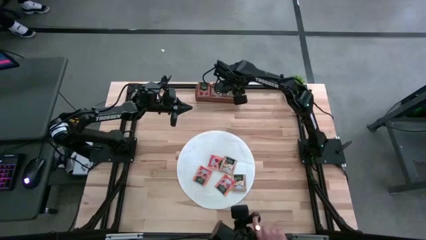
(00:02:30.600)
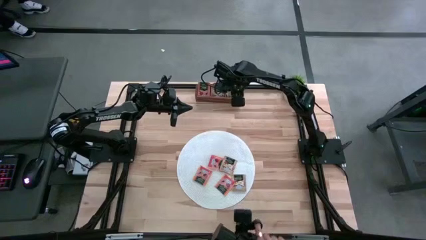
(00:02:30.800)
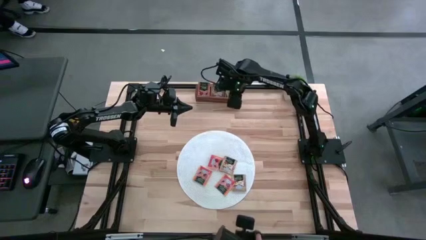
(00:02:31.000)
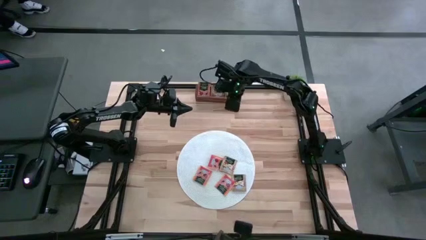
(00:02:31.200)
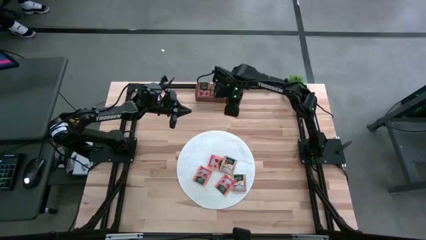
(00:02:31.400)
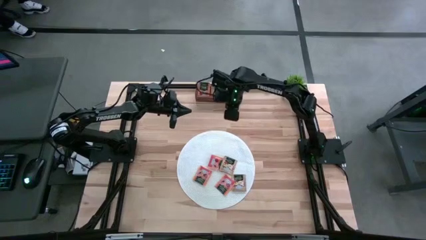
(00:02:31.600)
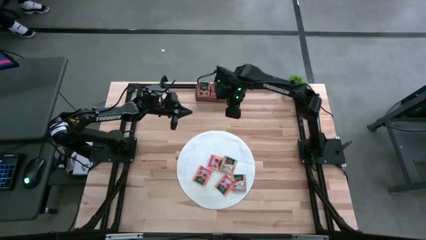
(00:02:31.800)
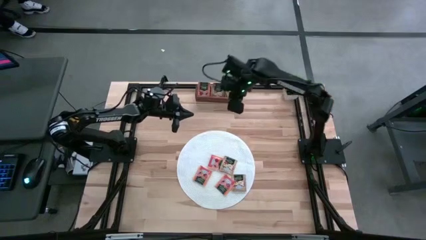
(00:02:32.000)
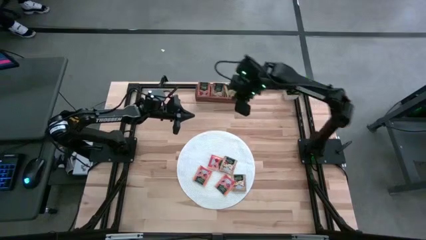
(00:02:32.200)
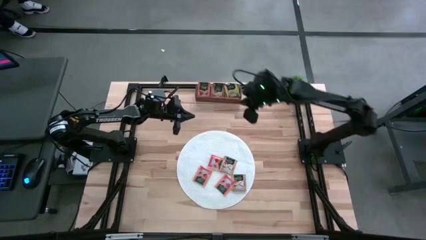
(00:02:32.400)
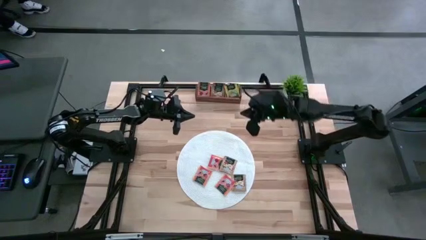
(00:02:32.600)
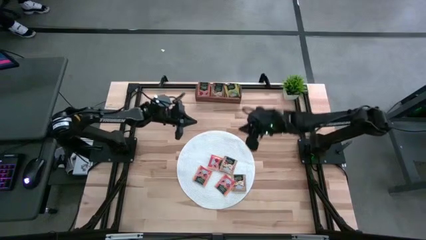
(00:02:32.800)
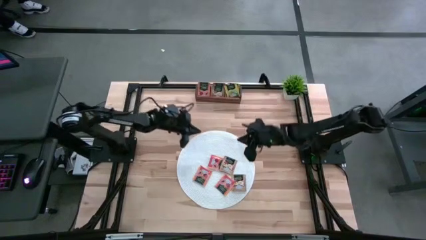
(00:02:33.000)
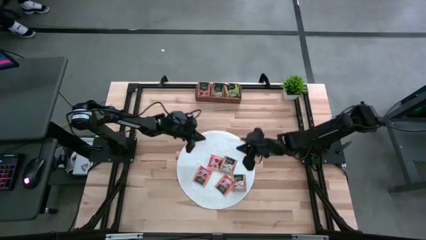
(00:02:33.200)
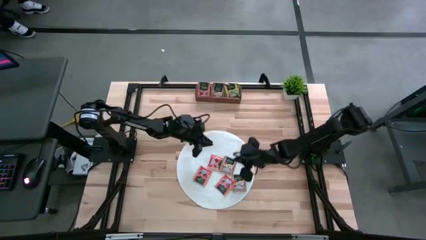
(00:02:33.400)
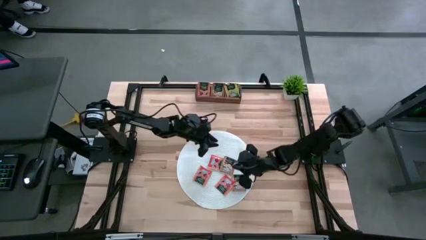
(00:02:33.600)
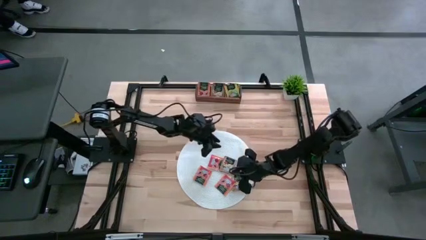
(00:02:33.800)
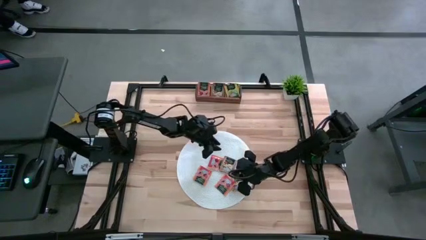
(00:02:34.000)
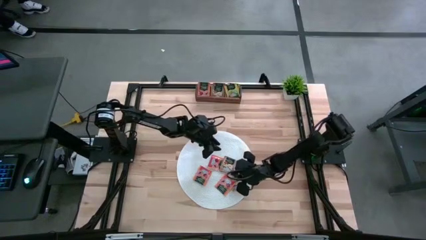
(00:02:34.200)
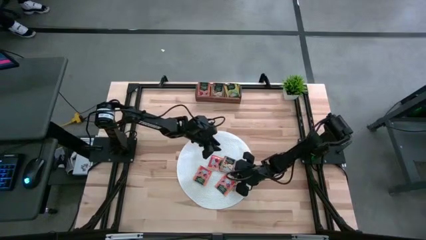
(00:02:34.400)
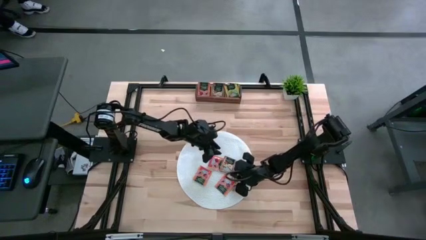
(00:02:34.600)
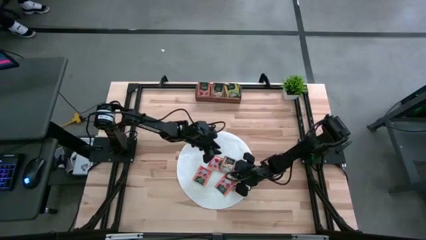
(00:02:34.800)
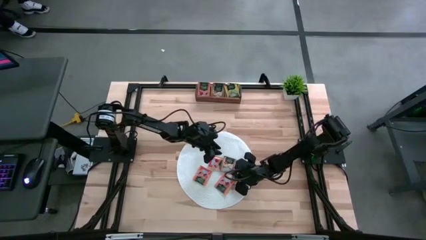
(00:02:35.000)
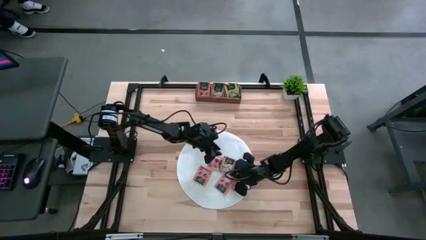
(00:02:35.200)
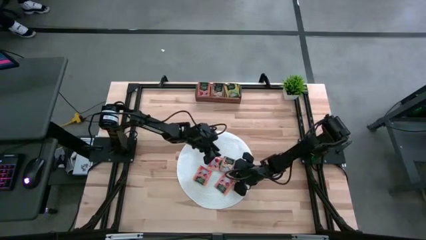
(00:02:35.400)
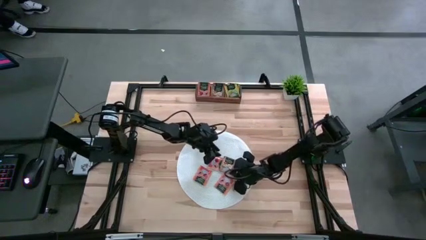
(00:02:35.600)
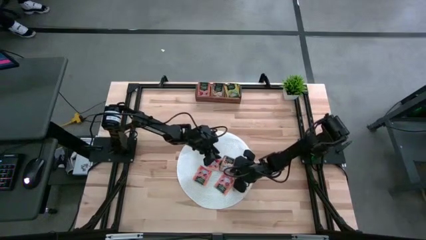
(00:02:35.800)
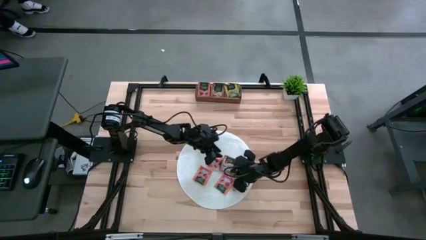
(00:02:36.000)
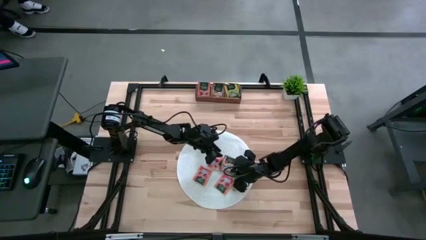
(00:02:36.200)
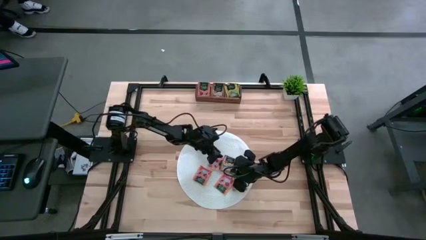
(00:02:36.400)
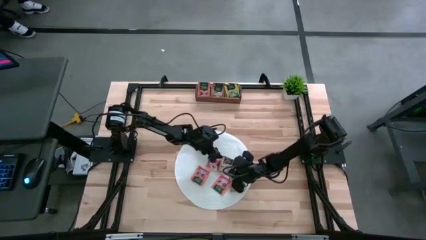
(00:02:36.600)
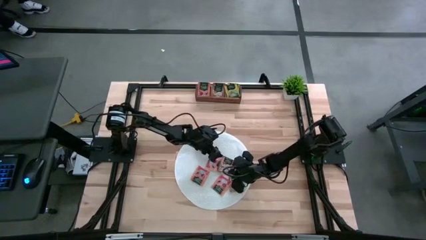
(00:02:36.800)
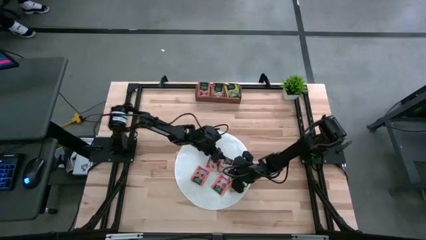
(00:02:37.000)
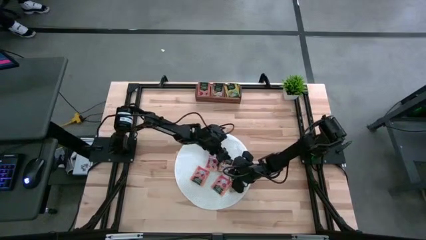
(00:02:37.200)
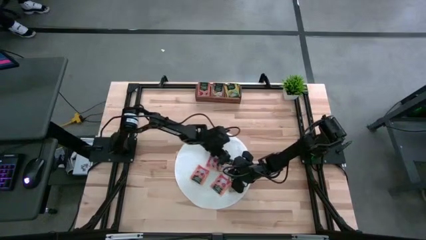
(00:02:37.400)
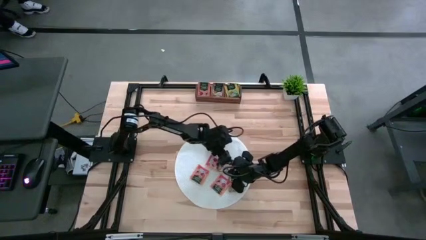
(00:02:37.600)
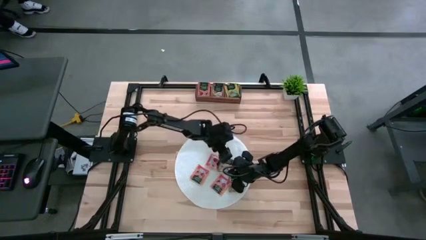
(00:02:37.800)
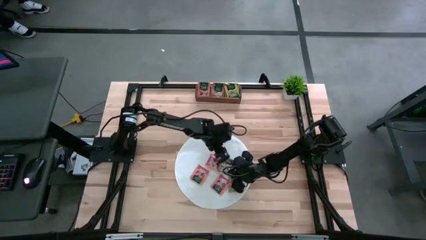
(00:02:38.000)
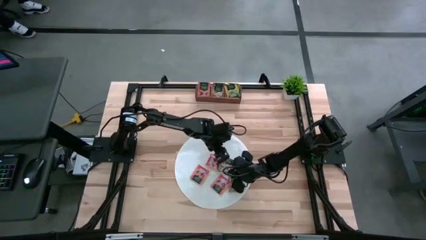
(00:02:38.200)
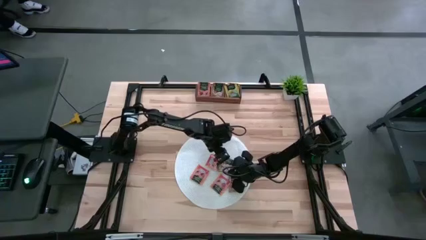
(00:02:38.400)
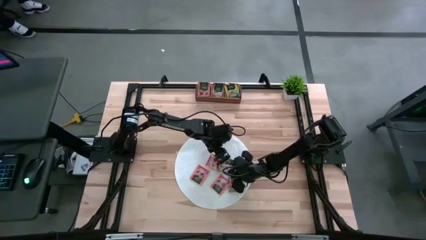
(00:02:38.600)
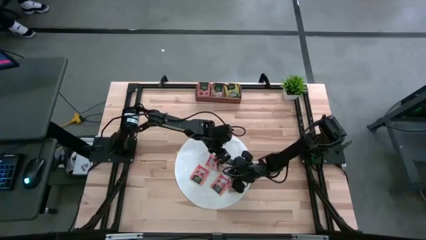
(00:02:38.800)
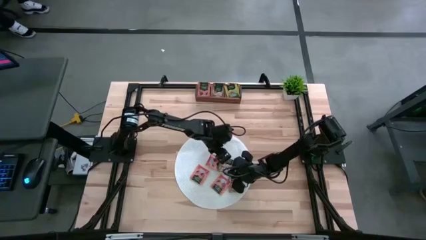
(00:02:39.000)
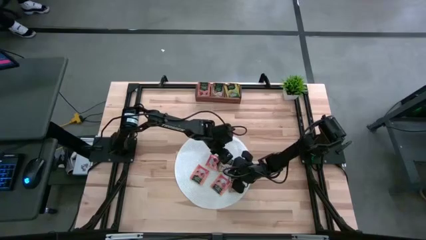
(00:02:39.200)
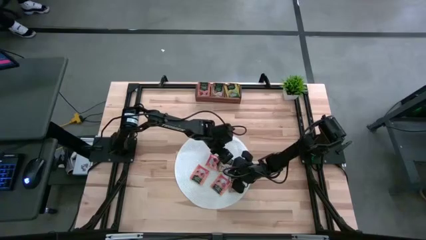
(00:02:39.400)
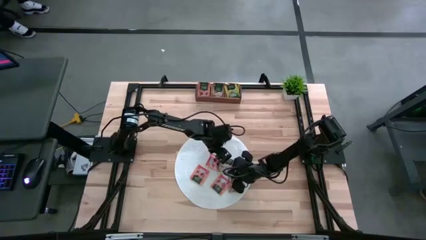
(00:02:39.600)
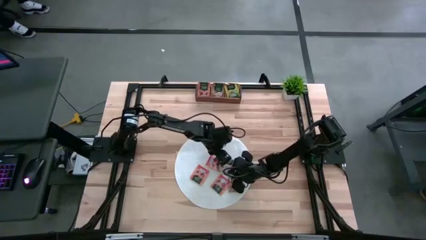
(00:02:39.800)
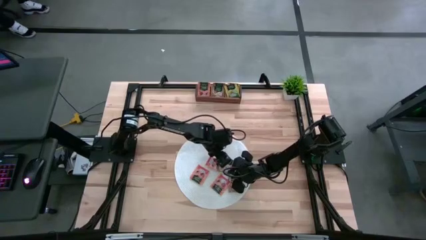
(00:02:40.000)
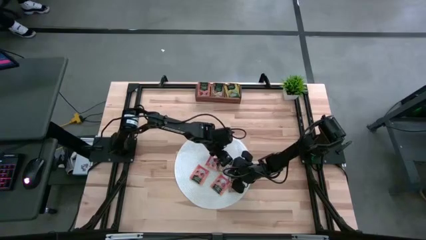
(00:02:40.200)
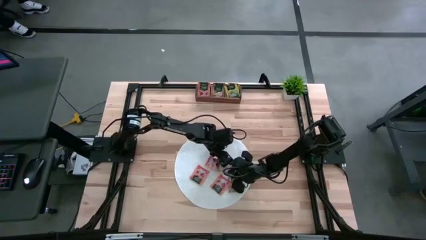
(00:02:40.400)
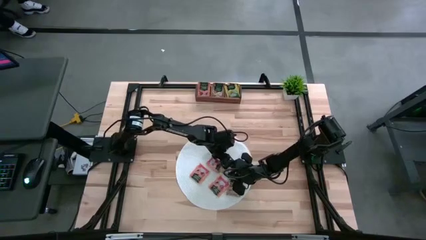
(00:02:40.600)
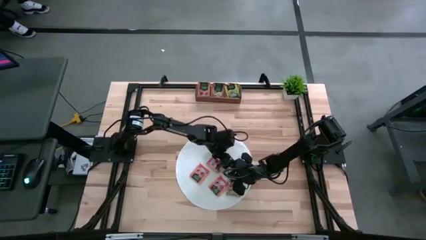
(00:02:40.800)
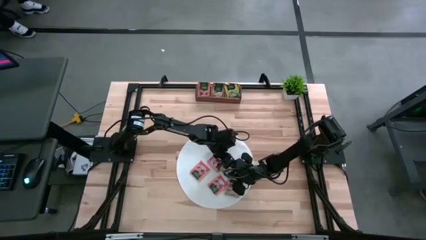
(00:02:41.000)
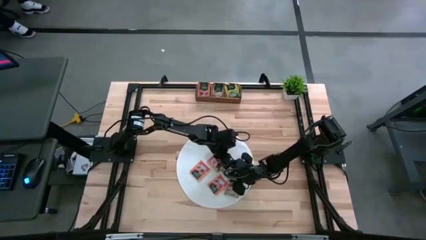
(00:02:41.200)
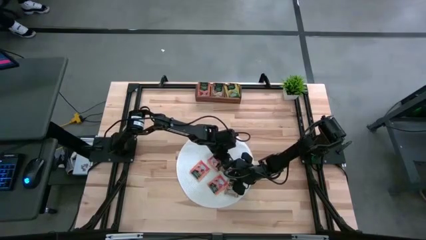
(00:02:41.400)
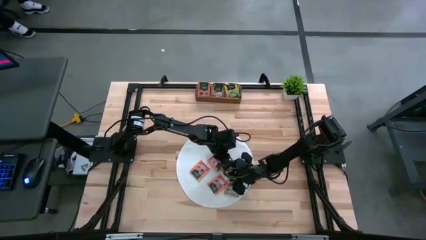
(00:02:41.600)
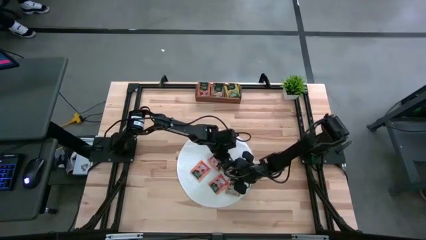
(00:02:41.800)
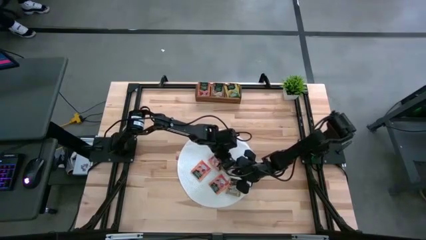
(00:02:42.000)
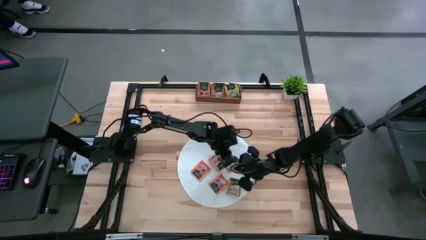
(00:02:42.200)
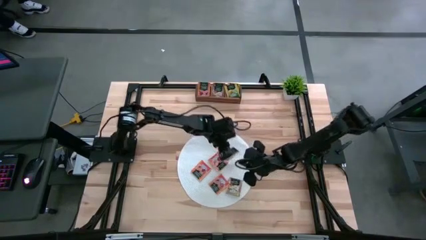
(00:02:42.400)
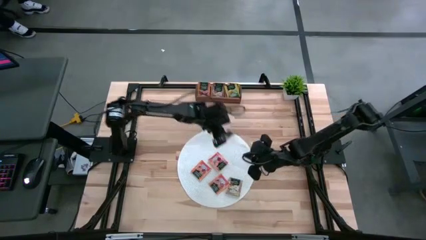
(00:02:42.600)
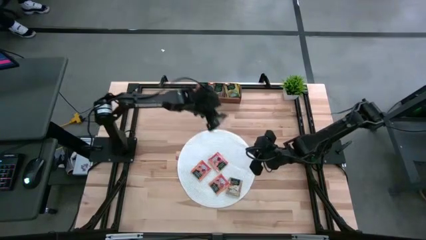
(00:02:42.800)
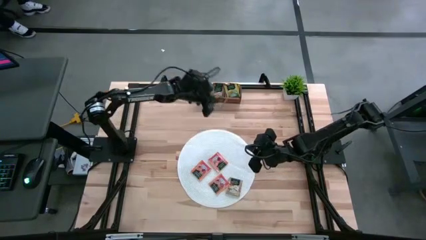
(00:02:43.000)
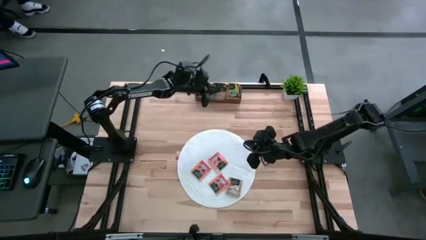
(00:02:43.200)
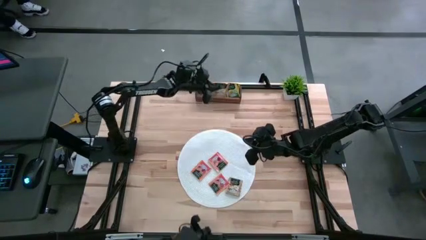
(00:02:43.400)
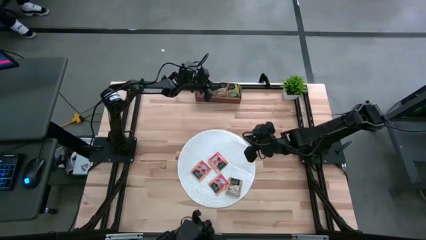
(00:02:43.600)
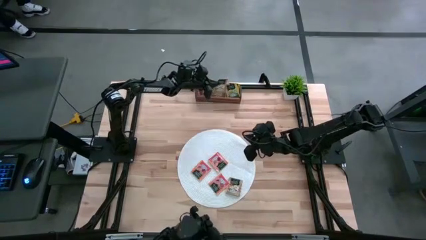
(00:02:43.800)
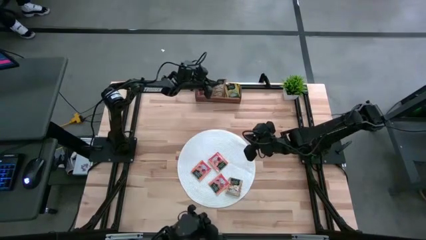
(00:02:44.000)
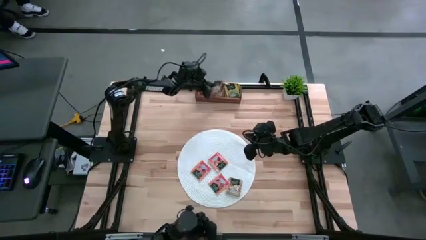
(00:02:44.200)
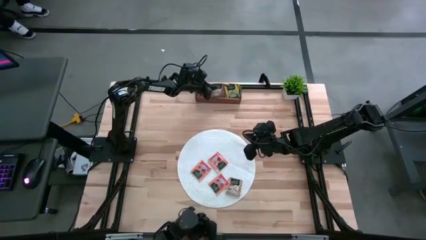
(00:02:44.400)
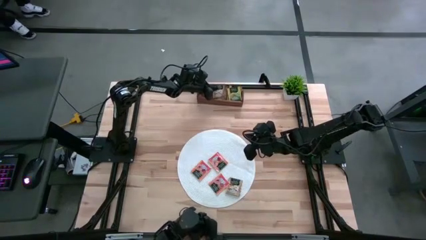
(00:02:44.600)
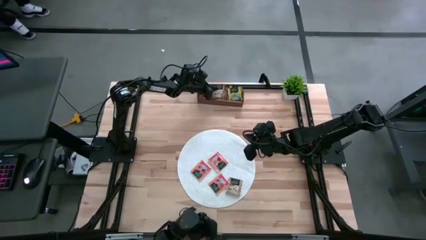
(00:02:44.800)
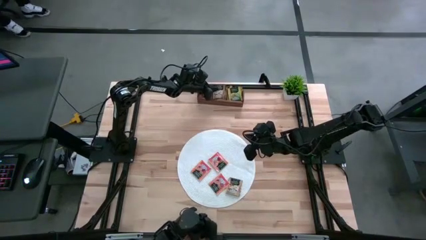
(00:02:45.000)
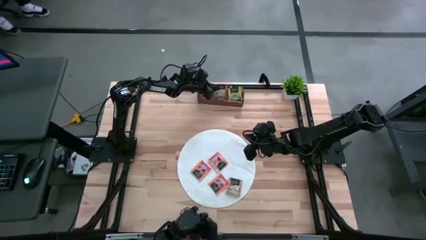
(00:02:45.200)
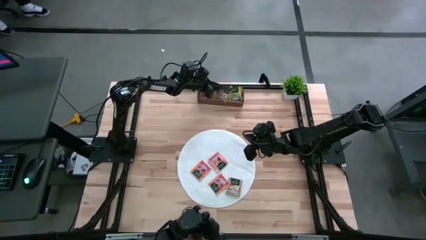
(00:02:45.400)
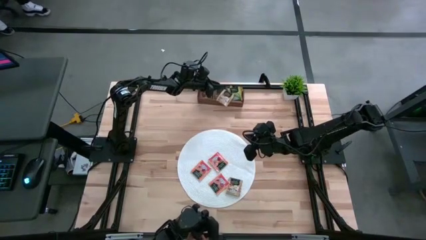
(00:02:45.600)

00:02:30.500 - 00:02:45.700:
Task: Pick & Place Tea
Put the brown tea bag into the middle section of the wooden organizer
